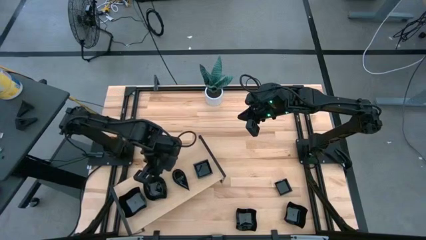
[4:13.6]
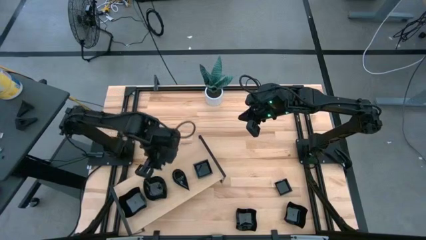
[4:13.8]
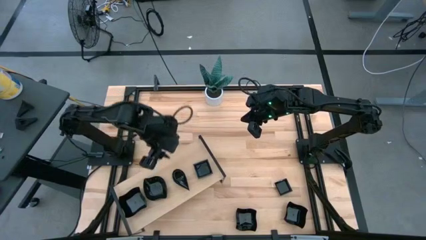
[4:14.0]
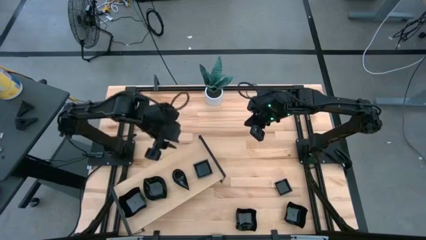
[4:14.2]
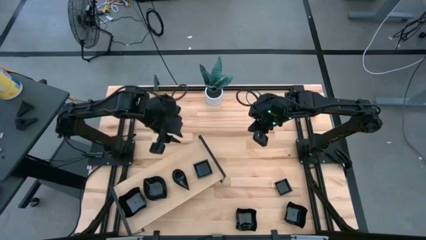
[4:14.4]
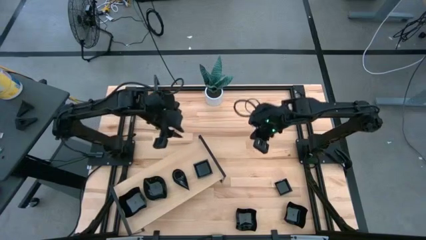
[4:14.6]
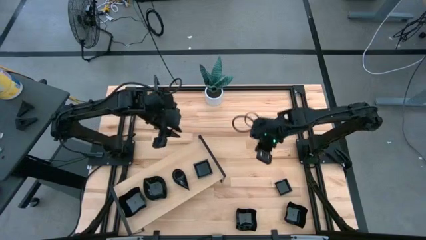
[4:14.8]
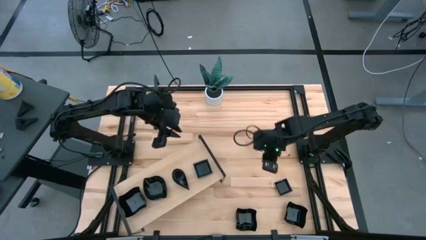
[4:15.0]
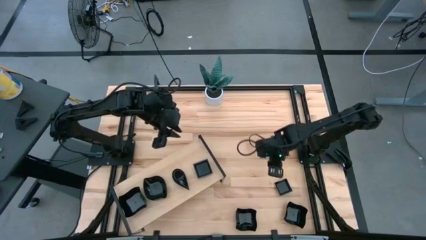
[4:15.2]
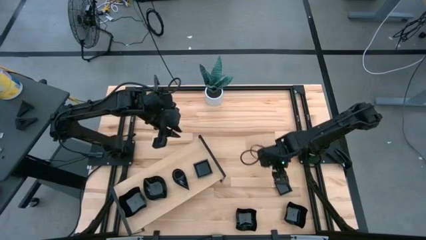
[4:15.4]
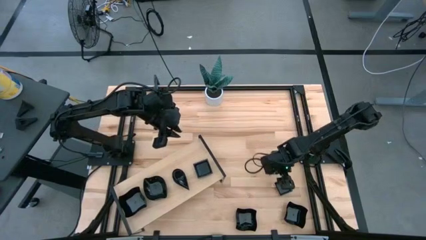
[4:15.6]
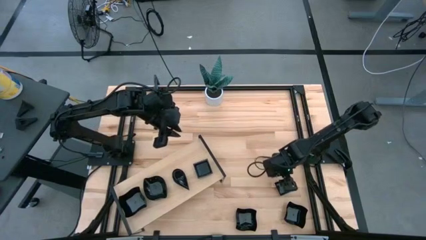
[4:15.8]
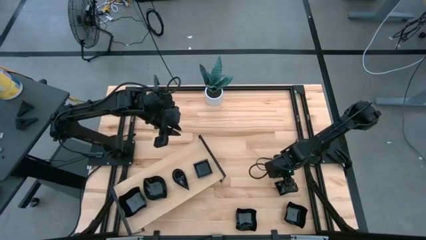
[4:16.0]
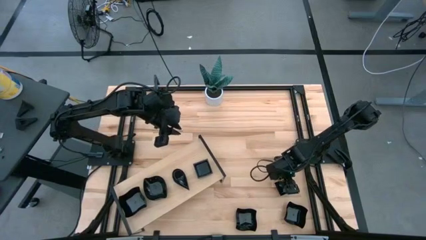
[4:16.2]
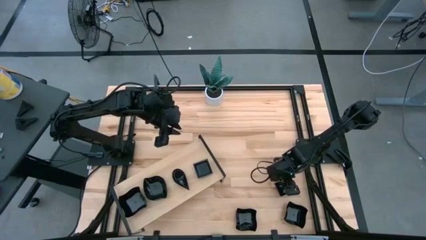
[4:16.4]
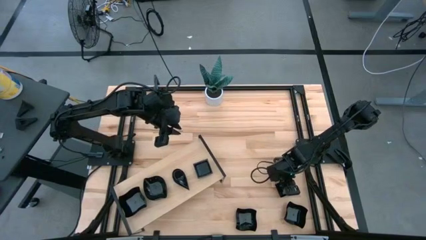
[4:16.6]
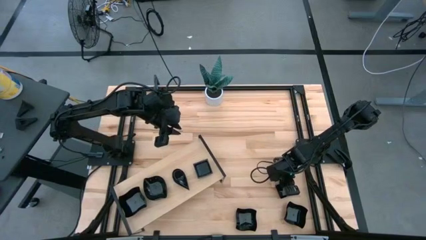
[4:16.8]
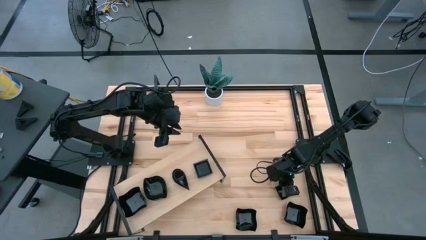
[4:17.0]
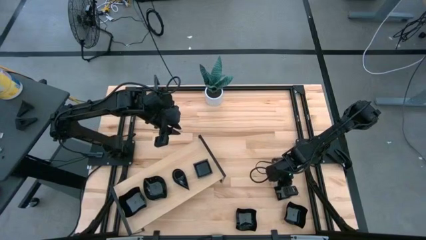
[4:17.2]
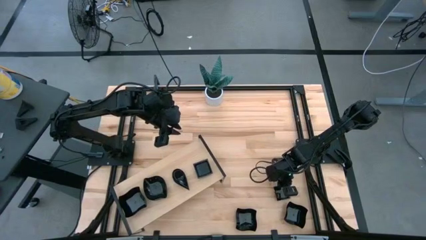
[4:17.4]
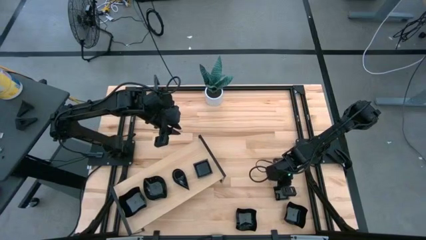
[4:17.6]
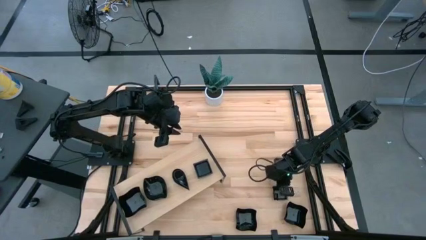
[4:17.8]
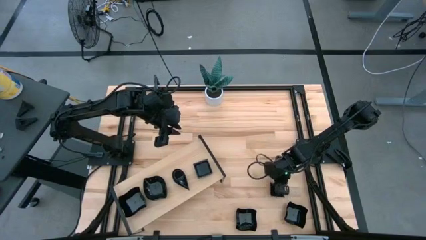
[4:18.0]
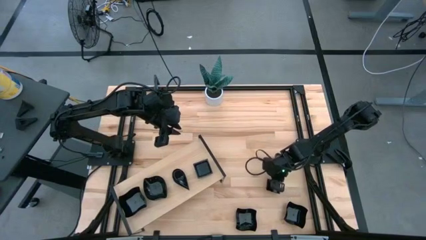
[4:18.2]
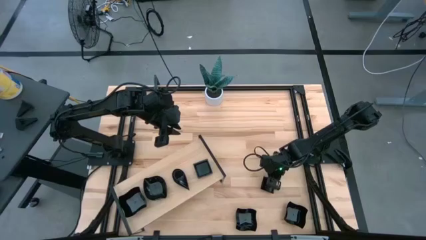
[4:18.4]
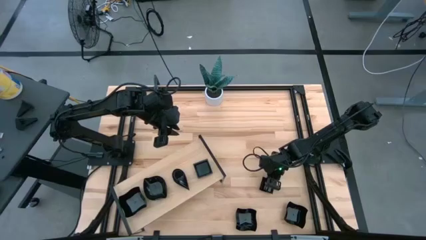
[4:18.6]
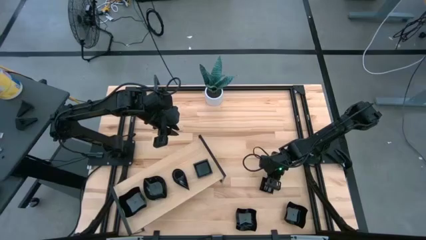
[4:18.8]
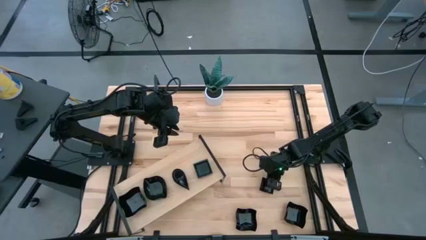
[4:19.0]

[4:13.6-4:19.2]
Task: Pick & Place Mini shaped plates
Stack the black square plate on top of the black square plate on the shelf

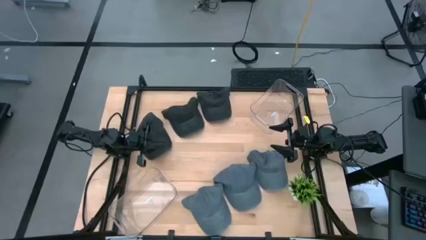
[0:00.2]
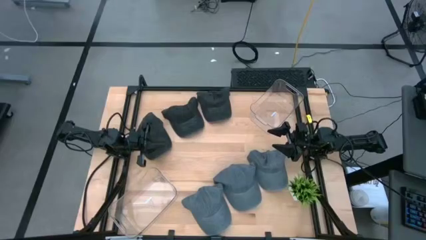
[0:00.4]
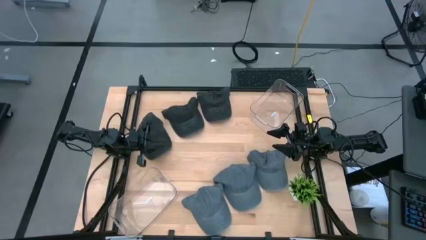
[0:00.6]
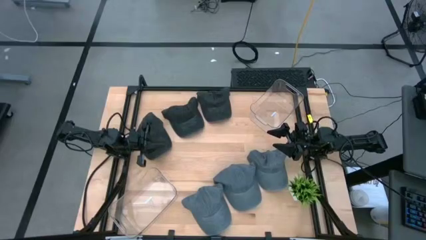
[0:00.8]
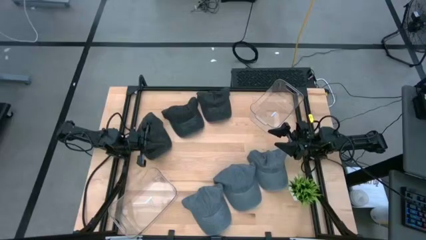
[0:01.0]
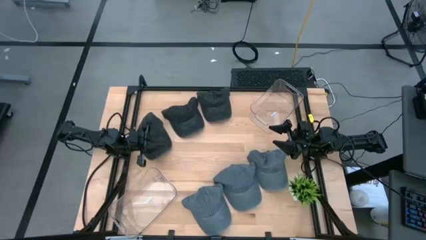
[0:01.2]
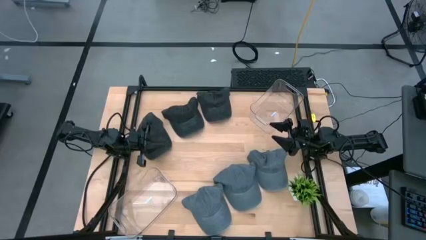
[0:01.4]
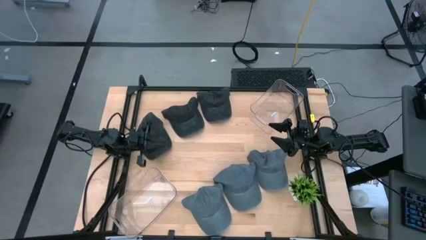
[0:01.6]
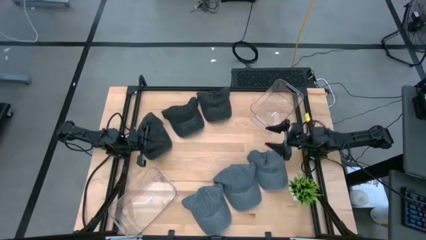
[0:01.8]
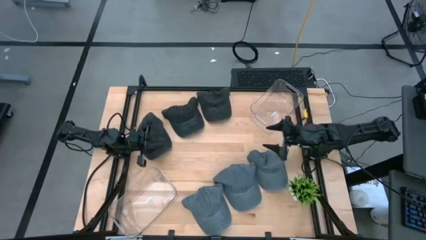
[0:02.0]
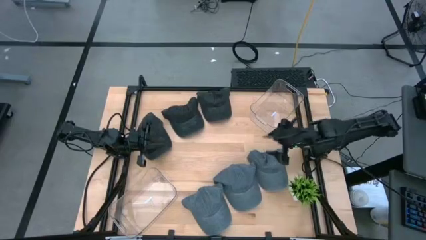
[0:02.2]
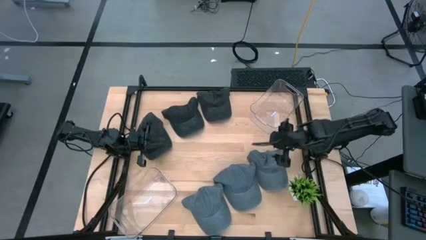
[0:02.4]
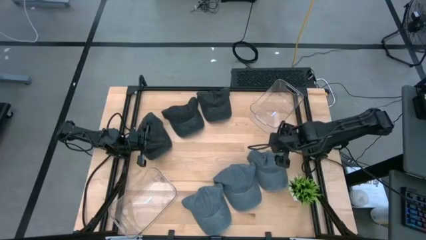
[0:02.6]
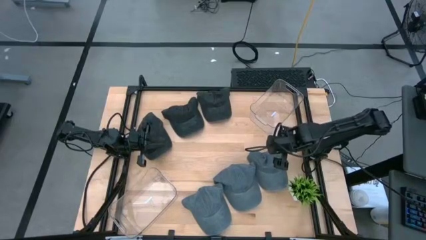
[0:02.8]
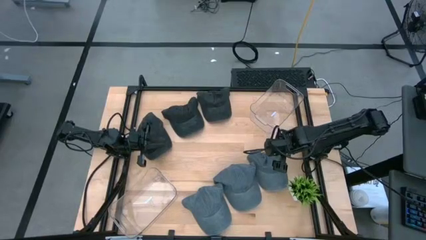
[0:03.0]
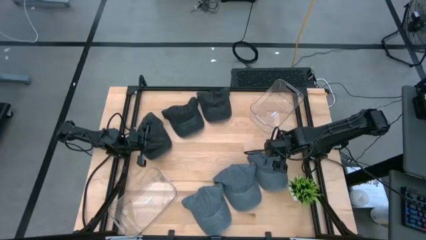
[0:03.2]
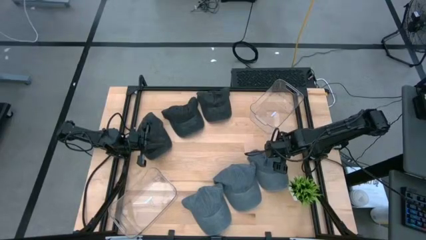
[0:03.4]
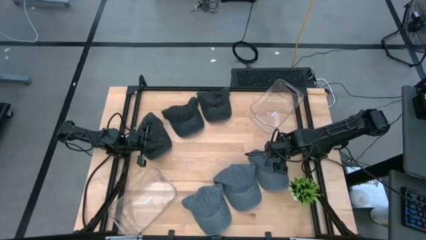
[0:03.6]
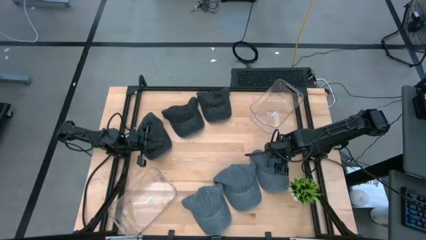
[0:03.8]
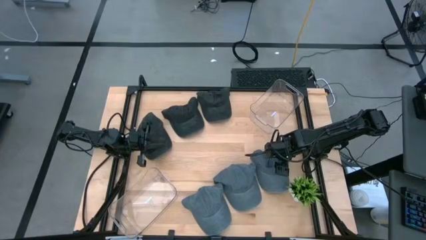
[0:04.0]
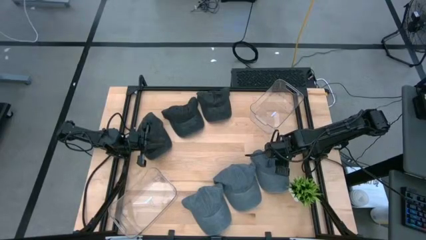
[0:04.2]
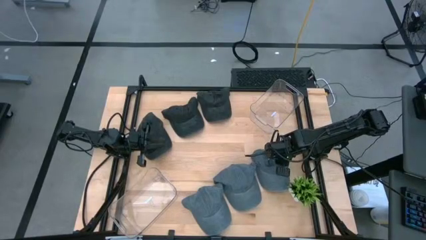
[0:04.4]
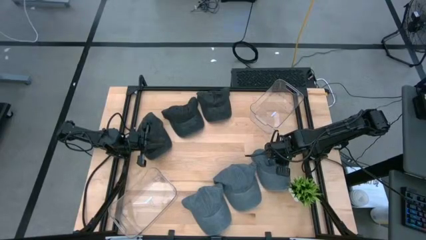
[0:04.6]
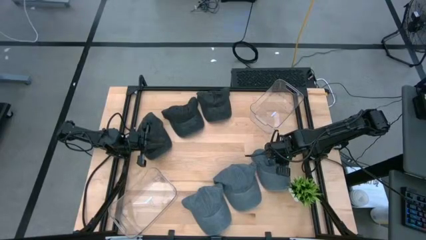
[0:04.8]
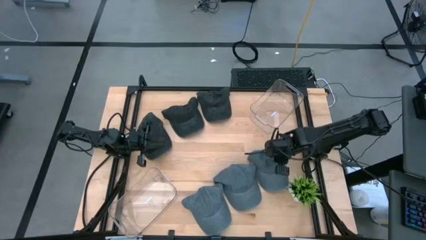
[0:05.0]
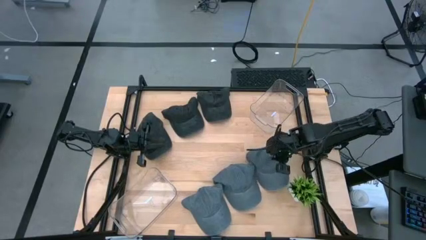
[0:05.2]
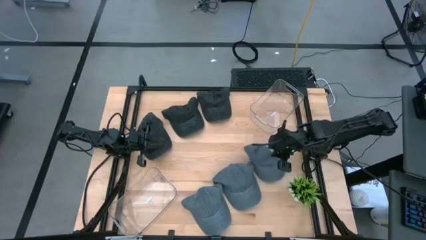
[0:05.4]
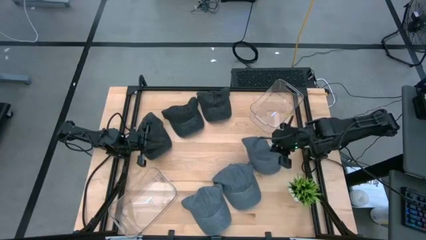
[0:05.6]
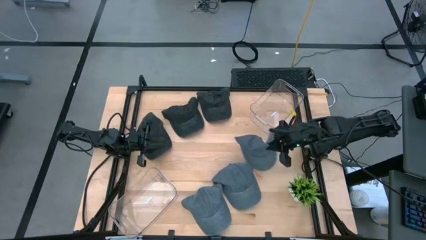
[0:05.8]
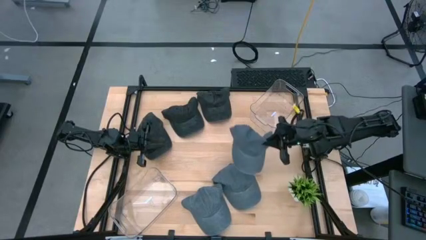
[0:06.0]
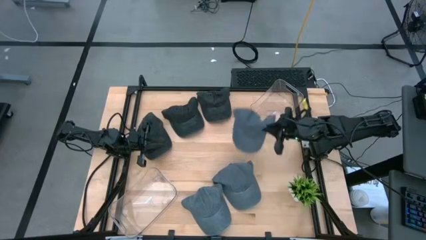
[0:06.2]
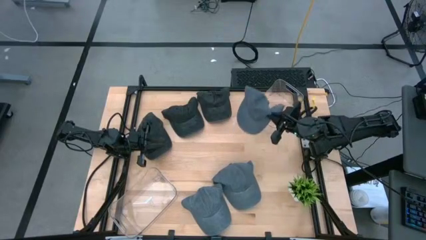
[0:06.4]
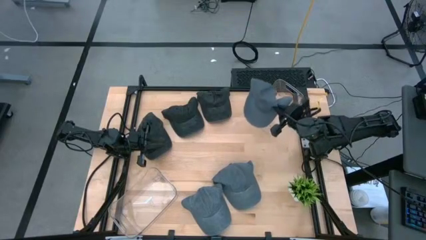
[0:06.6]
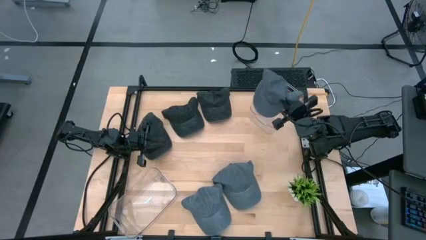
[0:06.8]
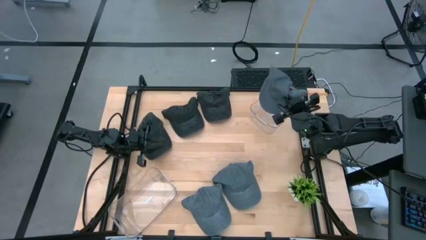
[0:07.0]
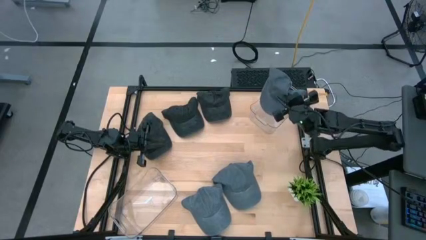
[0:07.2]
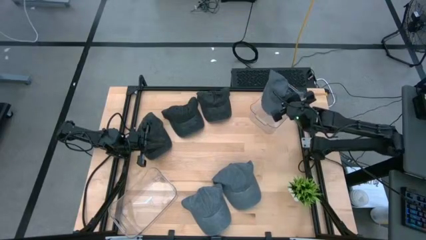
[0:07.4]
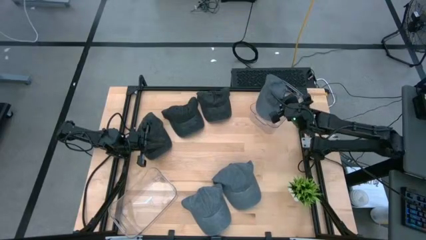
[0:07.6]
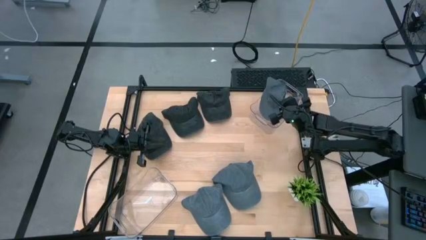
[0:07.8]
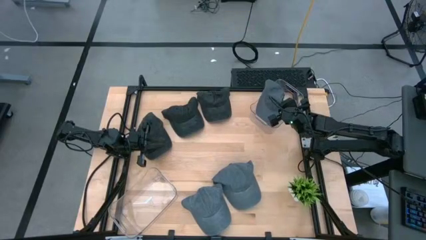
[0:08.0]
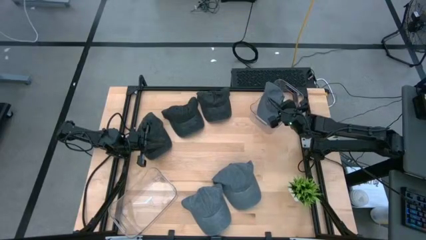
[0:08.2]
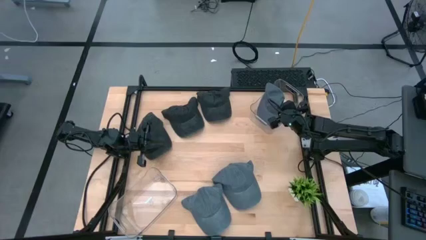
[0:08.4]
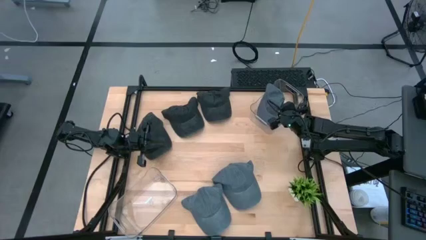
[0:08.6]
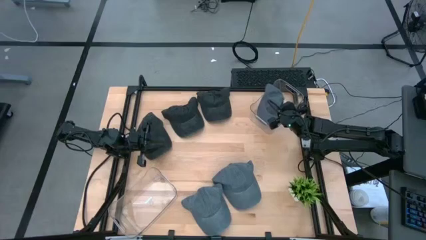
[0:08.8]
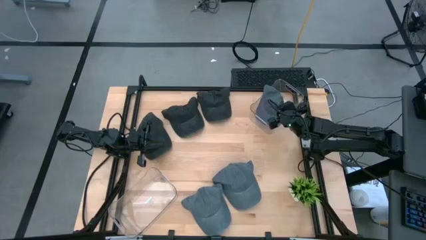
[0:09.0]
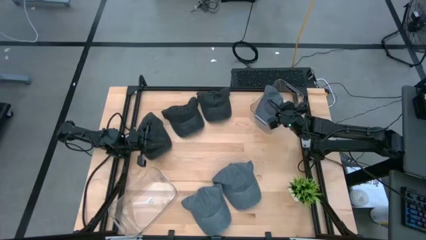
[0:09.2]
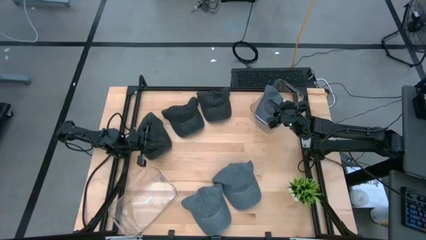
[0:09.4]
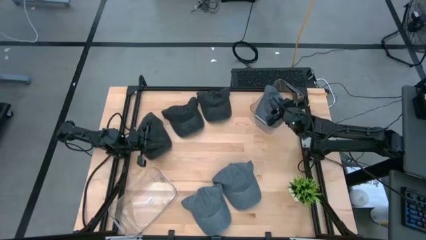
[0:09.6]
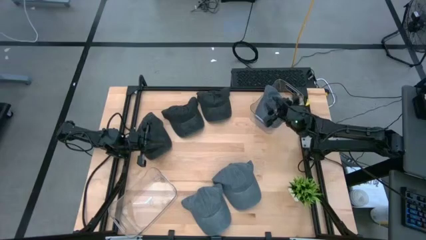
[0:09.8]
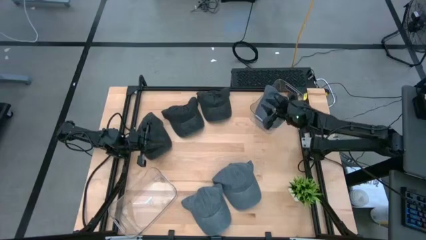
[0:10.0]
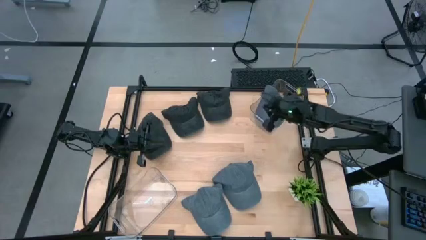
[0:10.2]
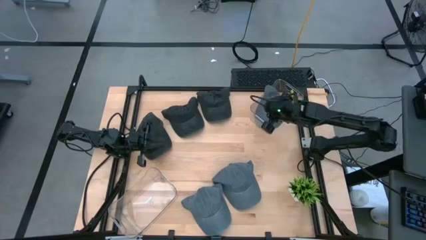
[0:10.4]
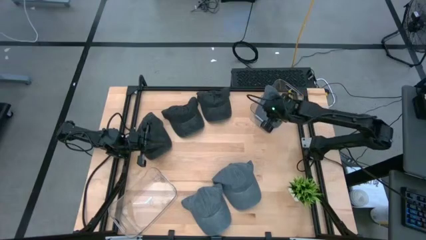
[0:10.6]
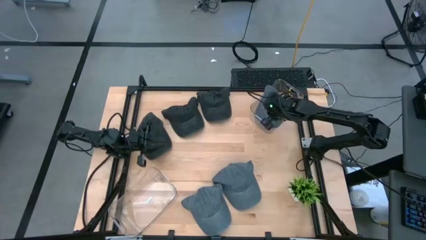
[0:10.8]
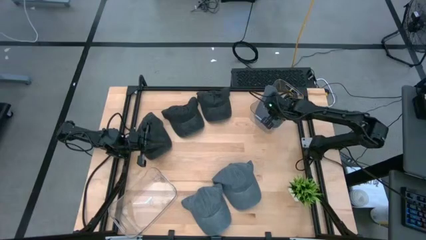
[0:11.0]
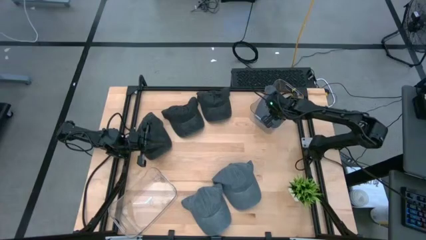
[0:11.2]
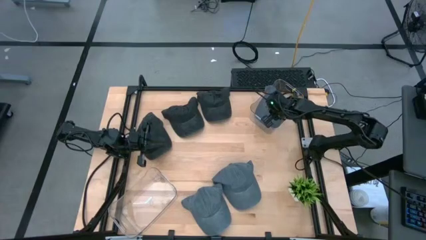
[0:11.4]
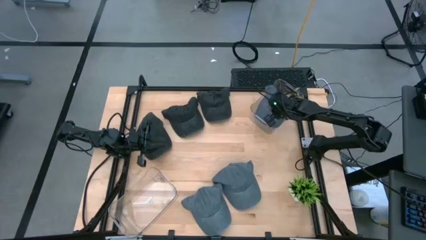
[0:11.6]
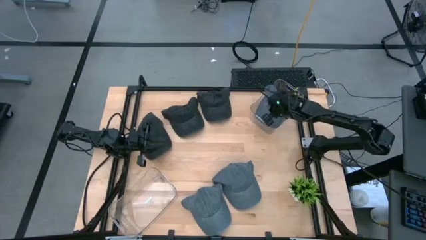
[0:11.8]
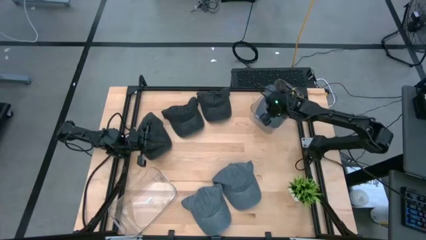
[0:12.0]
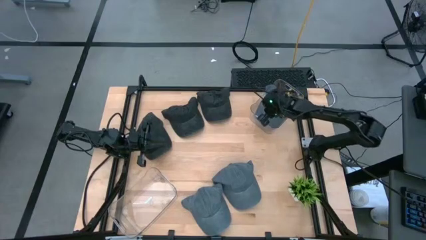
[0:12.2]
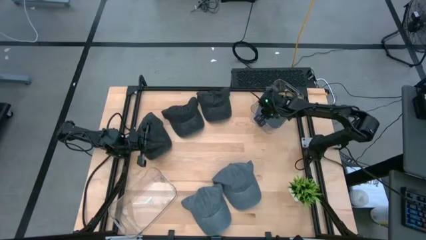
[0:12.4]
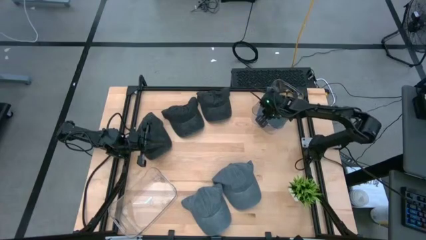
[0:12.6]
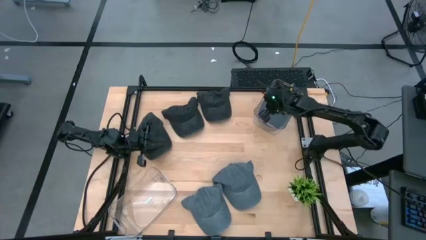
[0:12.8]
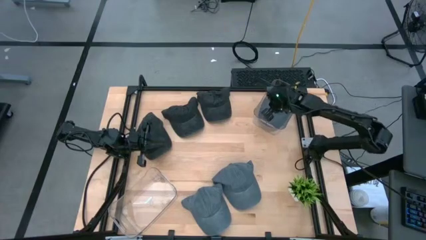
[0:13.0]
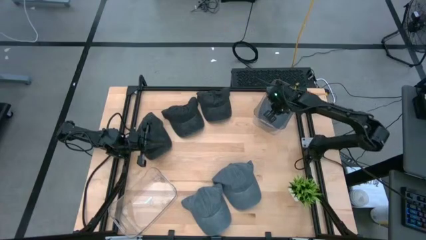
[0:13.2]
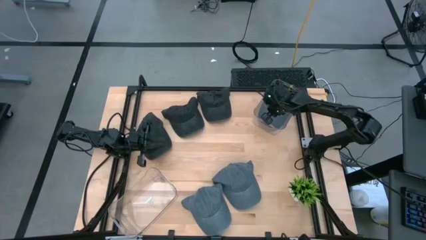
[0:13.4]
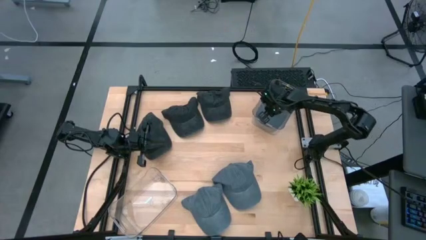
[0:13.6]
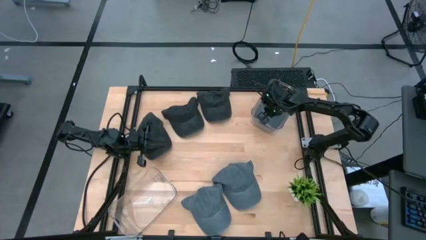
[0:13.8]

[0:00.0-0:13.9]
Task: Pick & Place hat
Put the top gray cap into the top transparent bin
